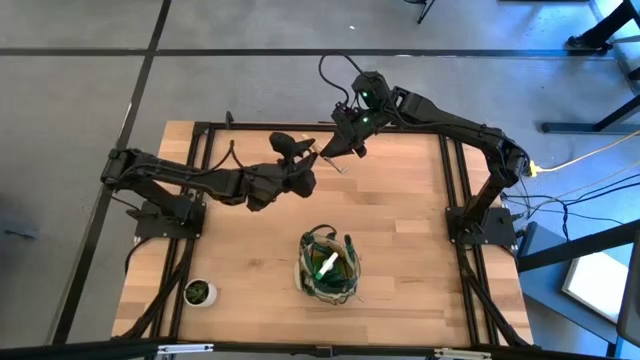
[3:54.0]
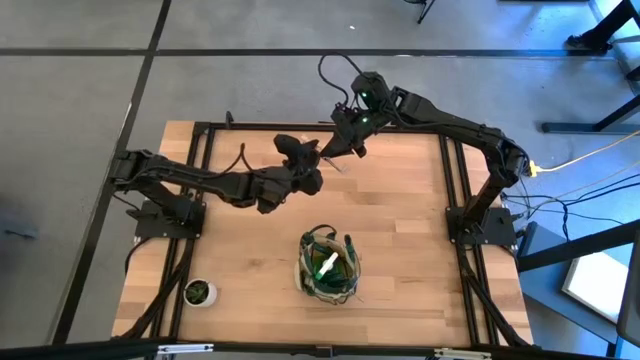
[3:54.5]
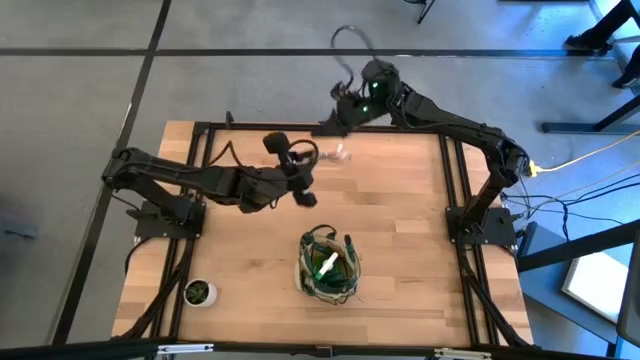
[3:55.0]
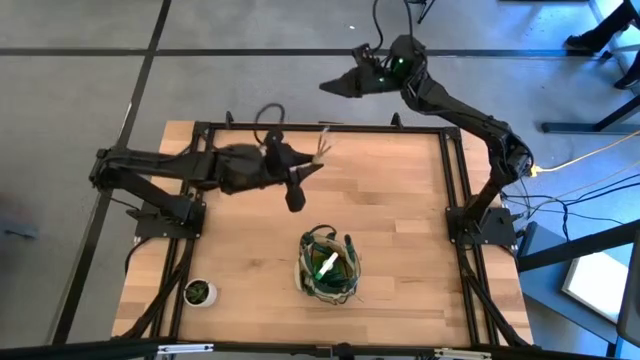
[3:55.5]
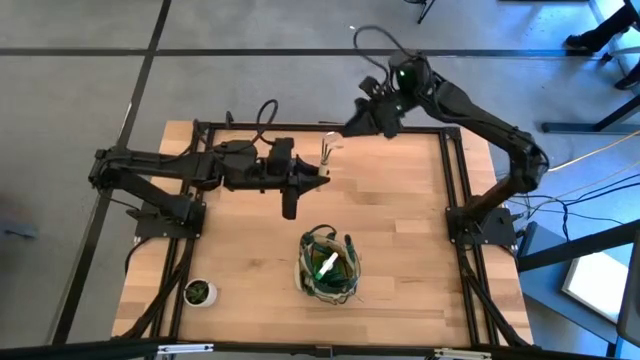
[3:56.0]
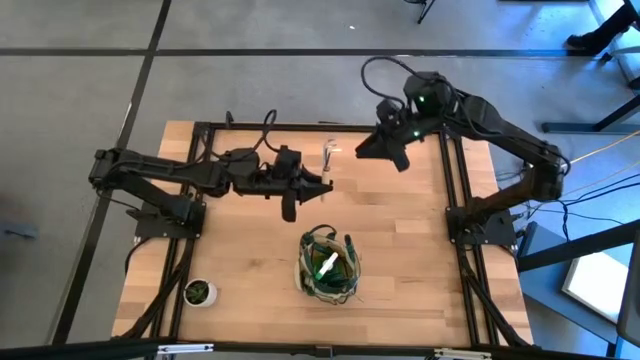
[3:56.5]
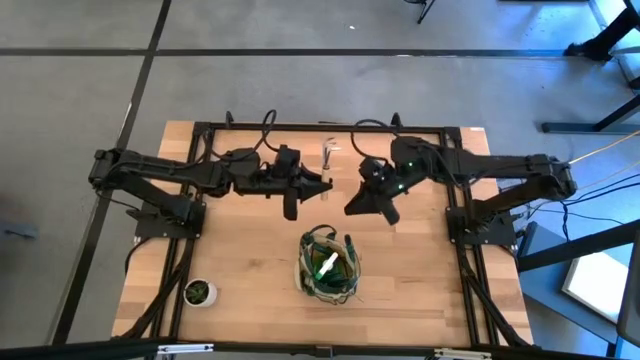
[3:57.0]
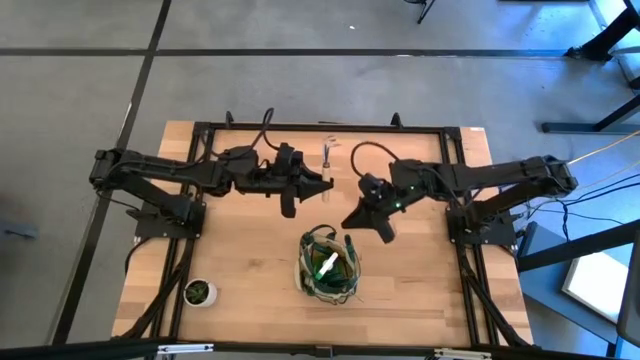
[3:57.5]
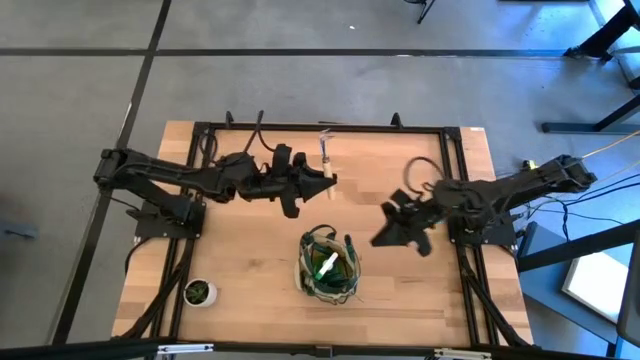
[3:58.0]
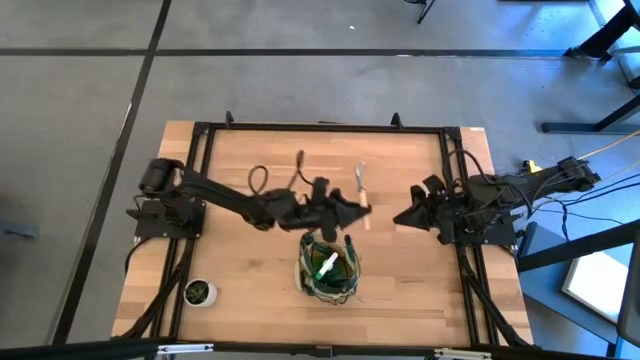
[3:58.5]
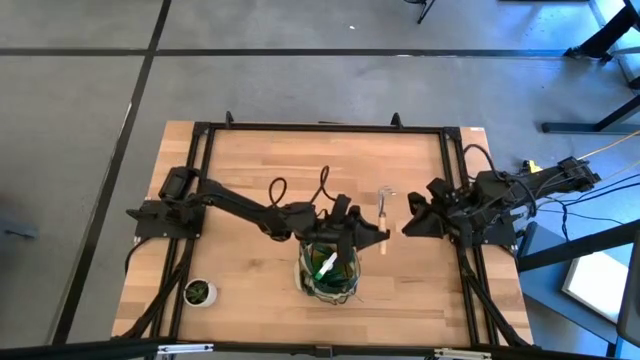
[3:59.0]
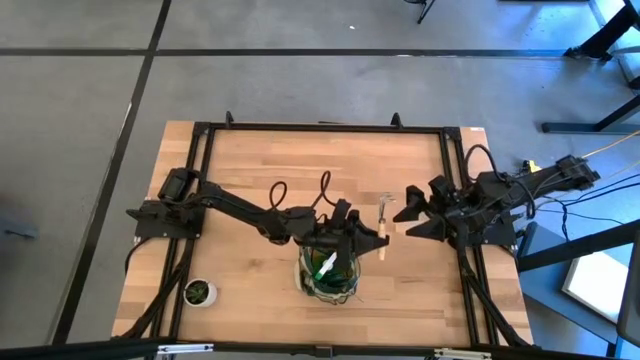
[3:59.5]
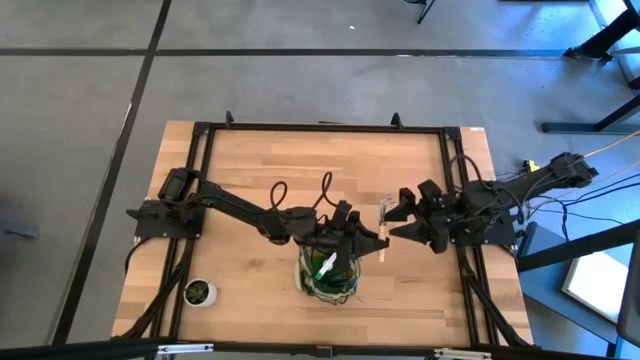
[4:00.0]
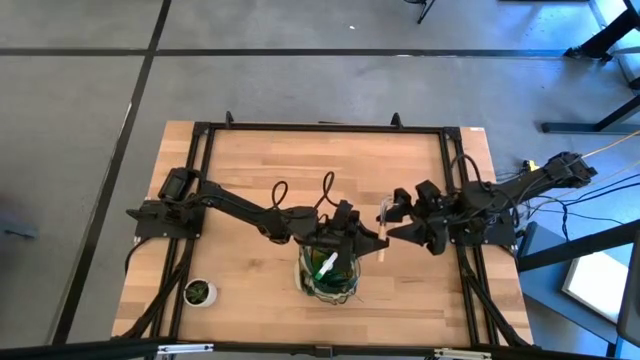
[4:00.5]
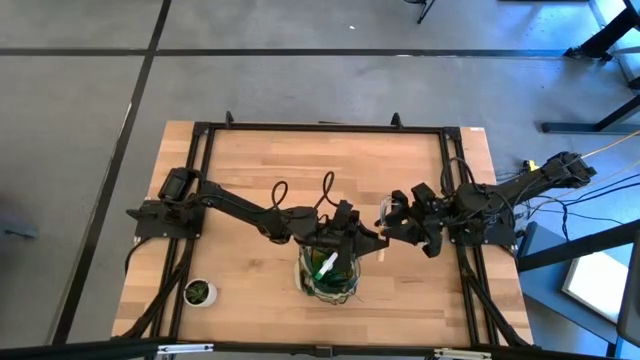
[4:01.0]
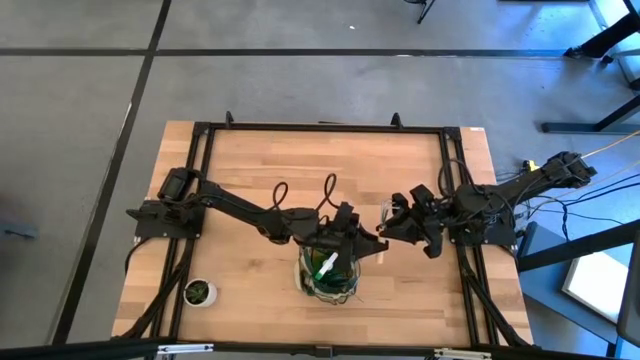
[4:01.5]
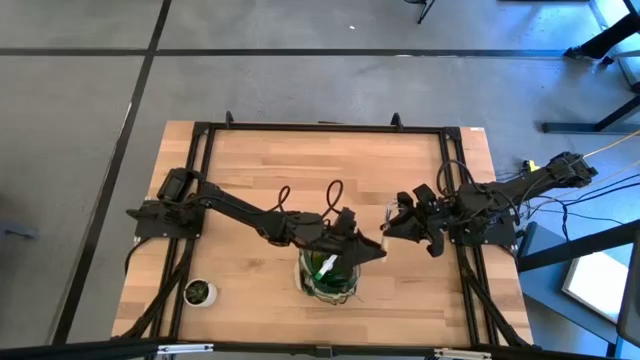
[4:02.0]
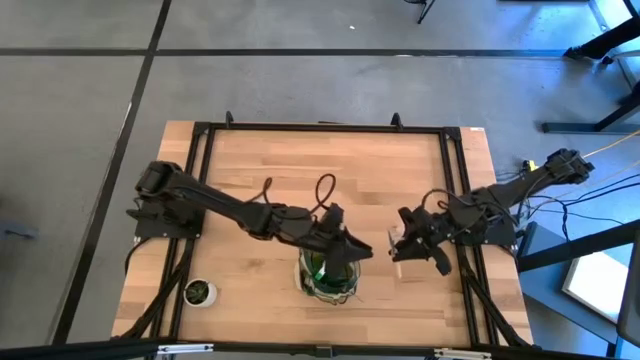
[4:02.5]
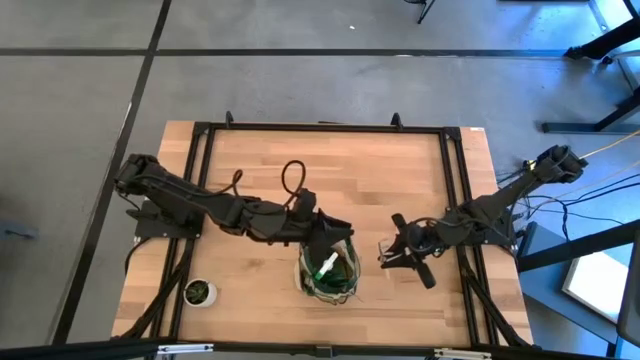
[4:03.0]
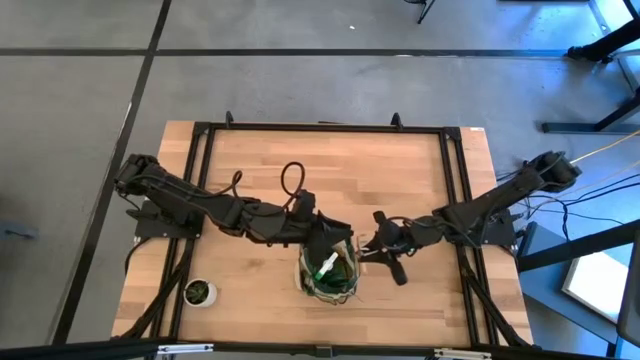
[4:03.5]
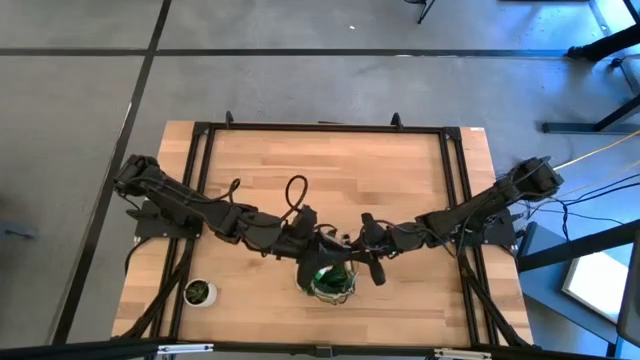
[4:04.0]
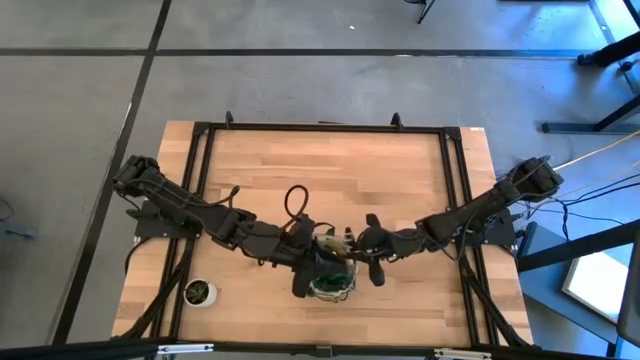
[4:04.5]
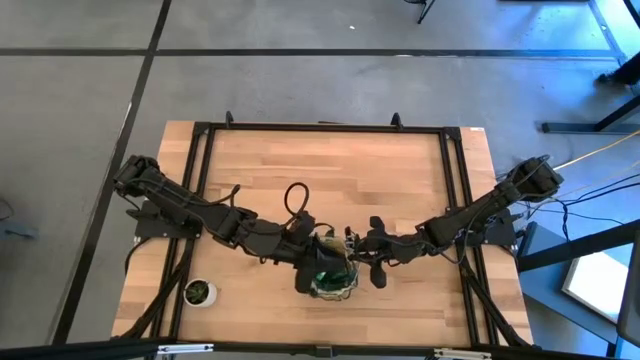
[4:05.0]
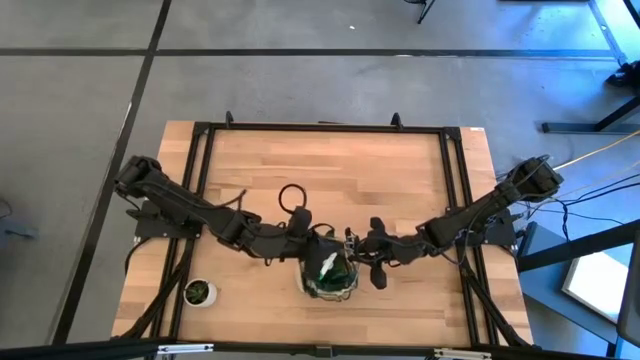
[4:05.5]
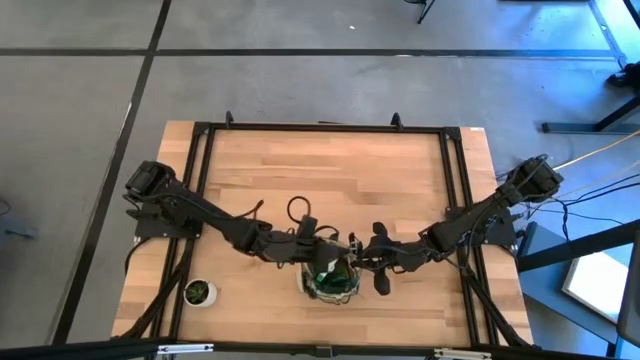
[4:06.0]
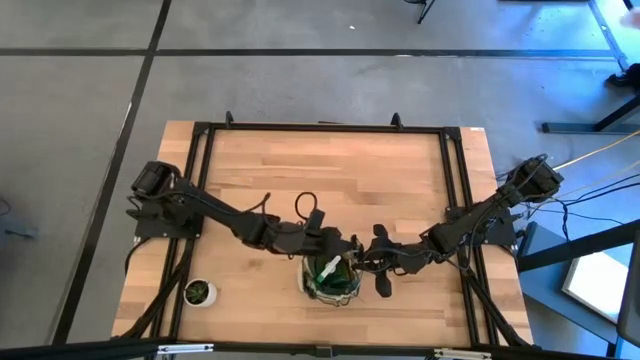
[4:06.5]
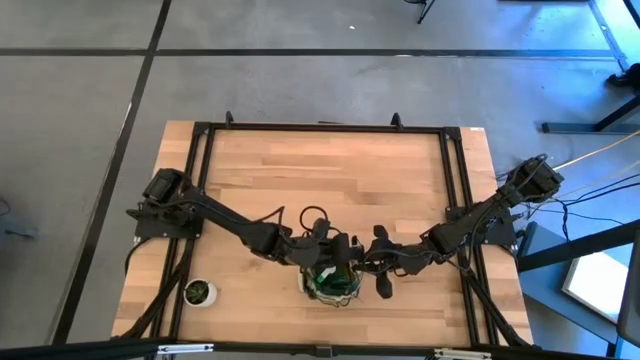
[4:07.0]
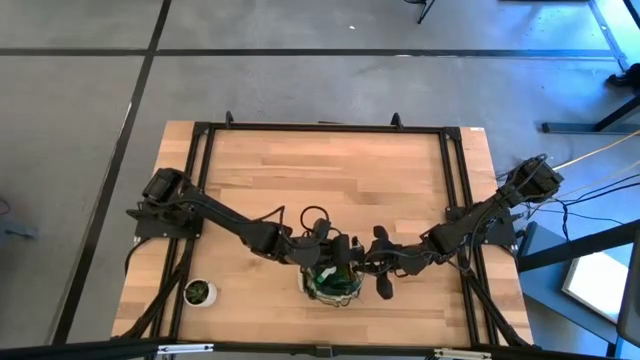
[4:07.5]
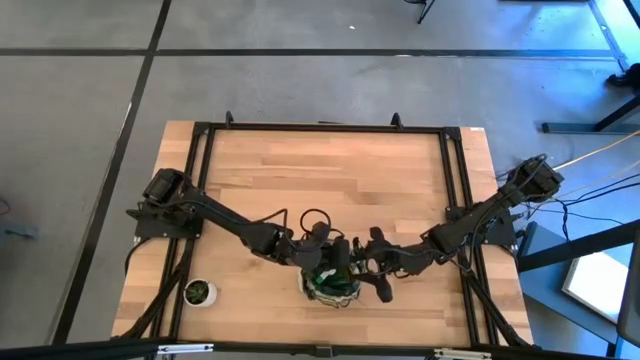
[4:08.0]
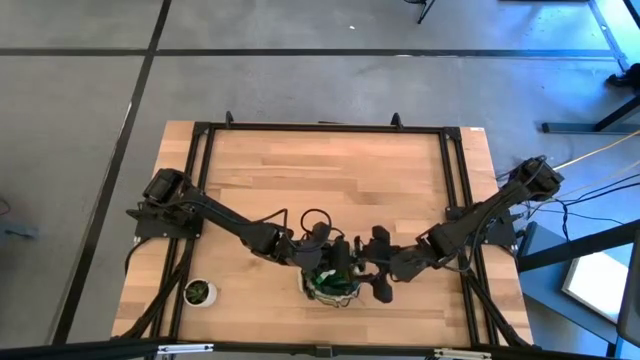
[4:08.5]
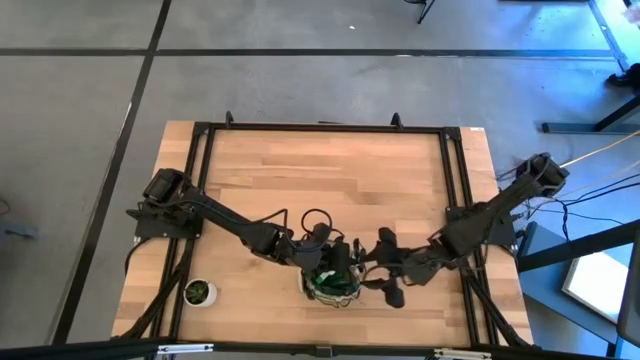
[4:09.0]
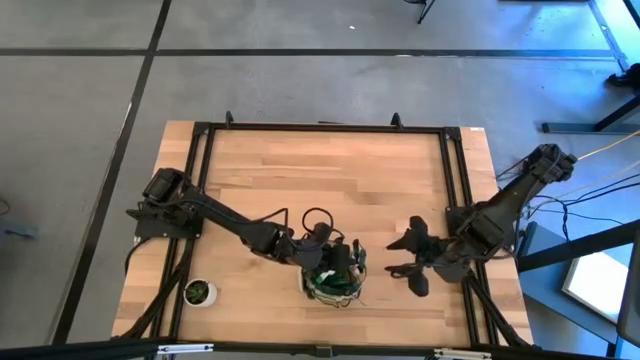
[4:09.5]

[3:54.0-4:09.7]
Task: Pick & Place Garden tools in Gardening bag
Put the brown hand rake into the gardening bag

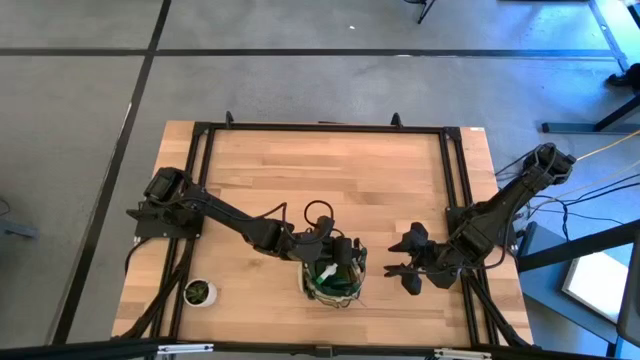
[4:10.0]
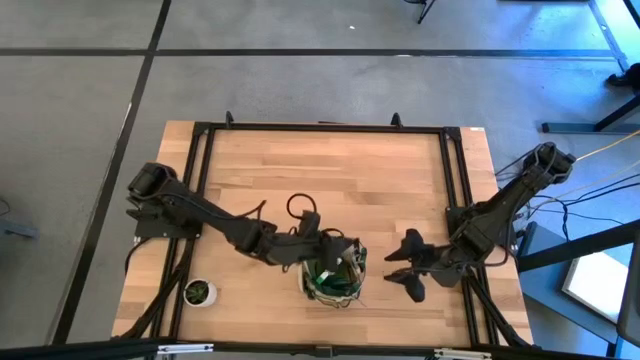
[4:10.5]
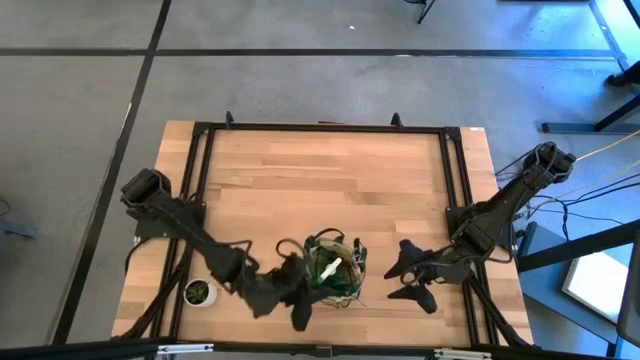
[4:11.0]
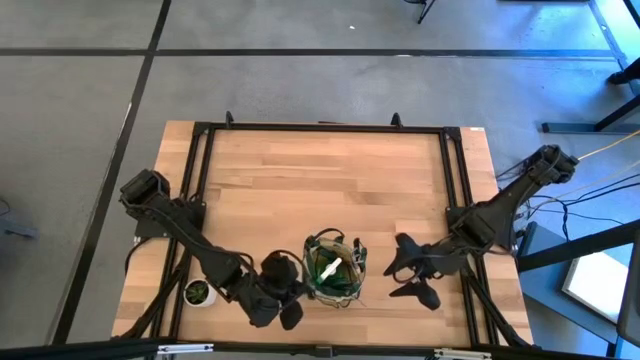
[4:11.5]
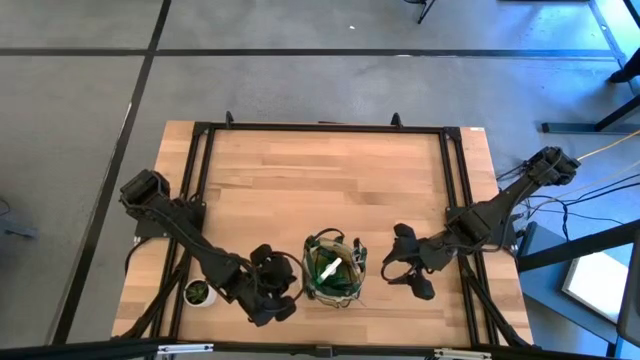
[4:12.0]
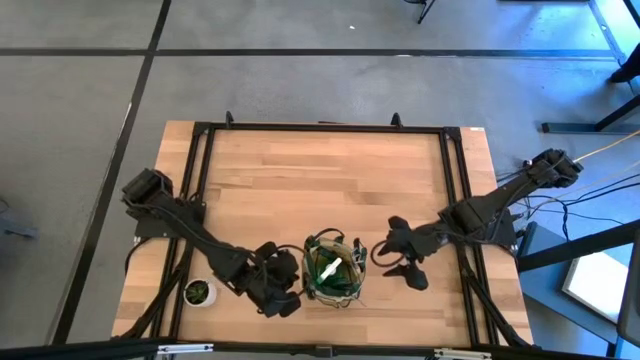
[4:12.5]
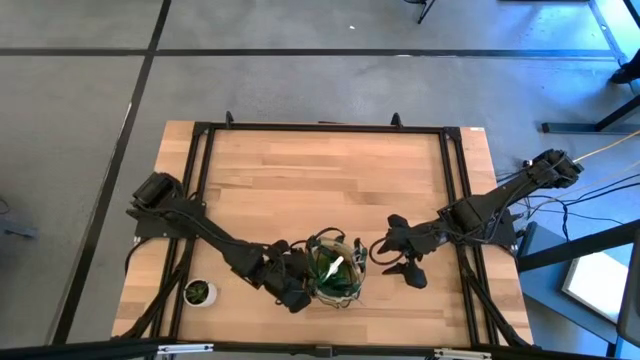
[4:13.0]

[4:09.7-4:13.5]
Adjust the gardening bag
